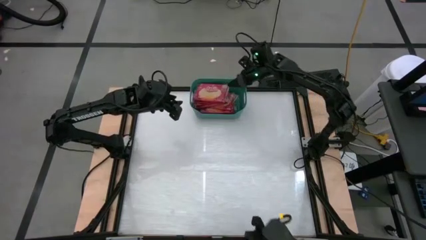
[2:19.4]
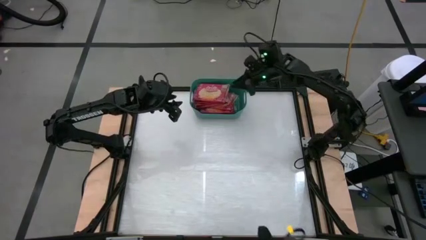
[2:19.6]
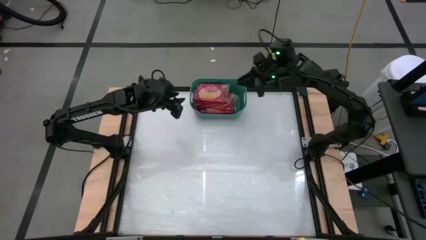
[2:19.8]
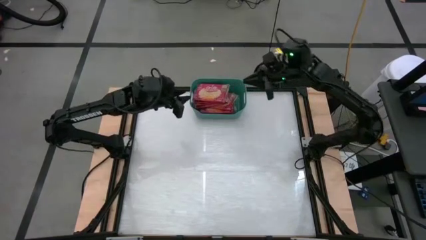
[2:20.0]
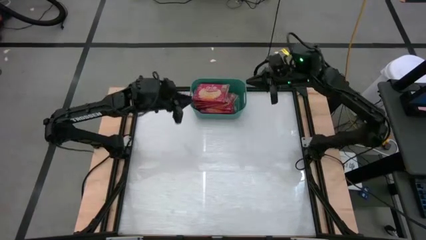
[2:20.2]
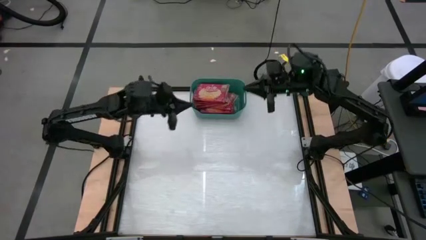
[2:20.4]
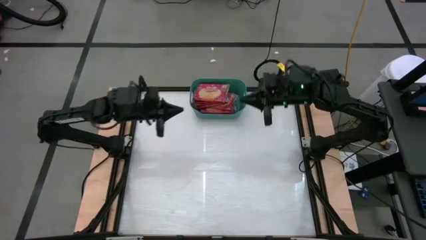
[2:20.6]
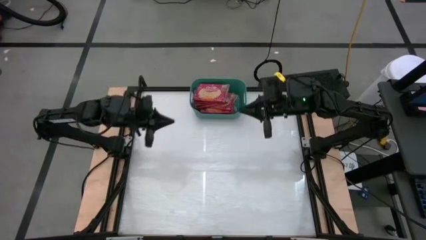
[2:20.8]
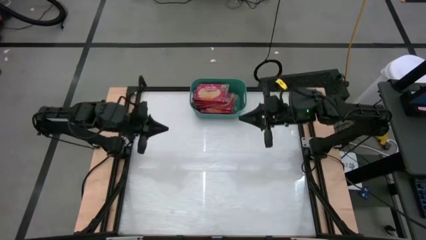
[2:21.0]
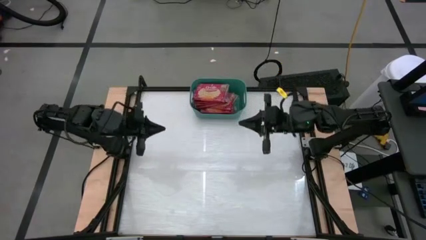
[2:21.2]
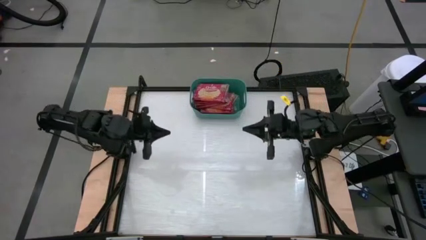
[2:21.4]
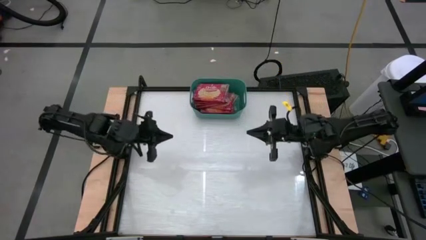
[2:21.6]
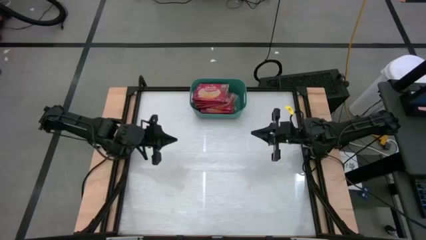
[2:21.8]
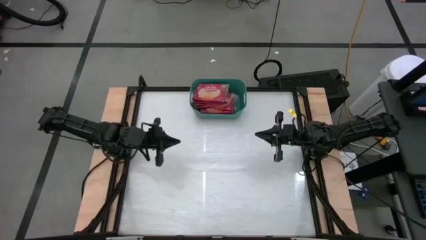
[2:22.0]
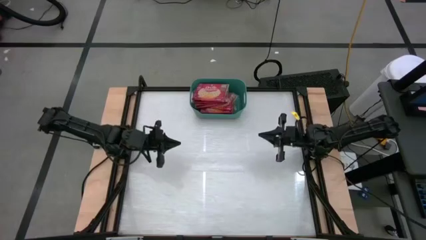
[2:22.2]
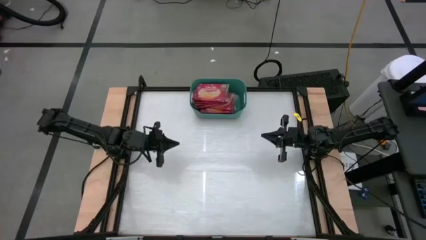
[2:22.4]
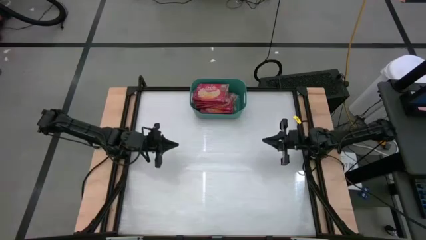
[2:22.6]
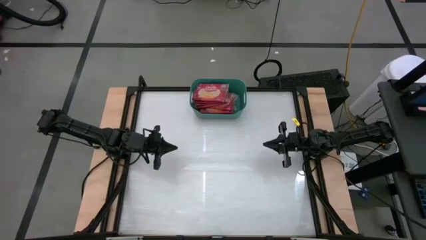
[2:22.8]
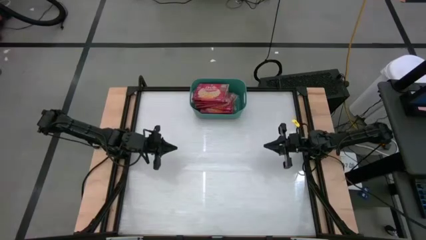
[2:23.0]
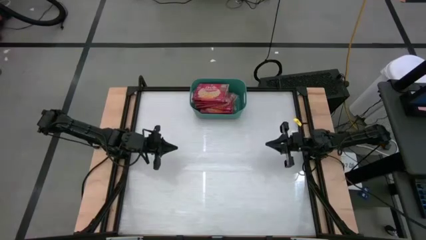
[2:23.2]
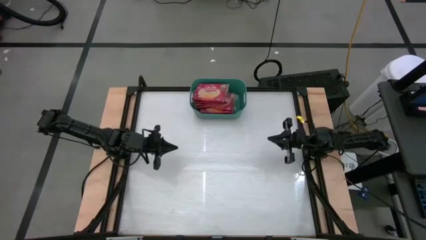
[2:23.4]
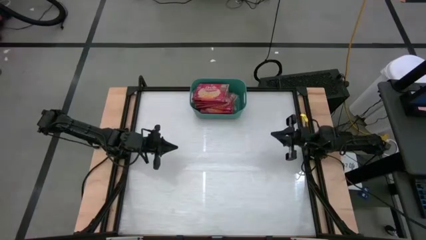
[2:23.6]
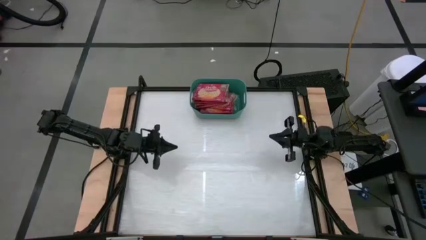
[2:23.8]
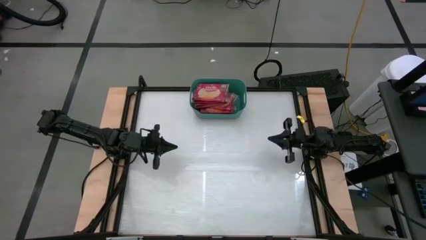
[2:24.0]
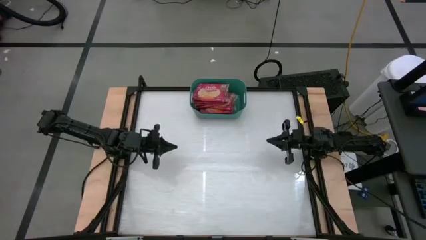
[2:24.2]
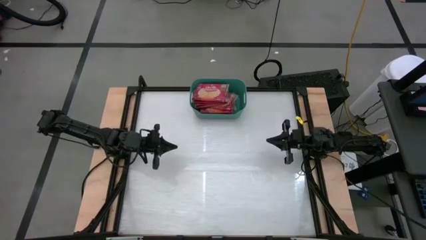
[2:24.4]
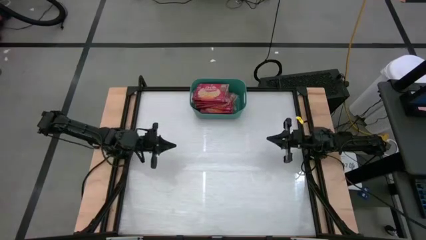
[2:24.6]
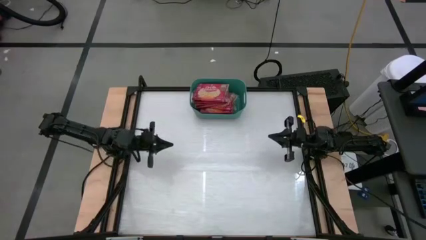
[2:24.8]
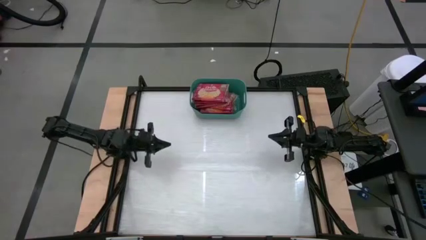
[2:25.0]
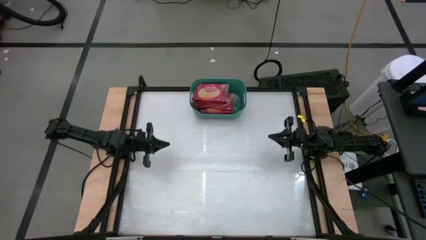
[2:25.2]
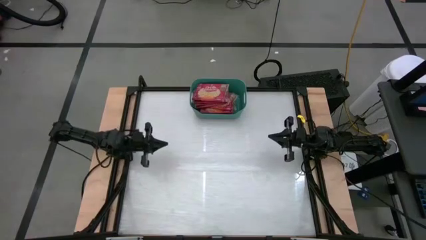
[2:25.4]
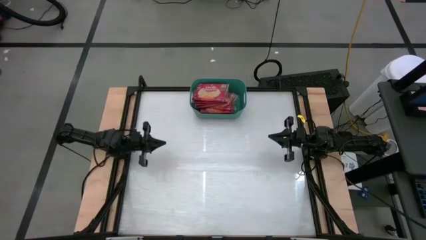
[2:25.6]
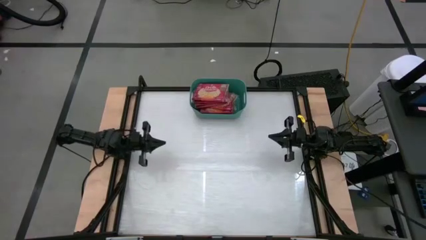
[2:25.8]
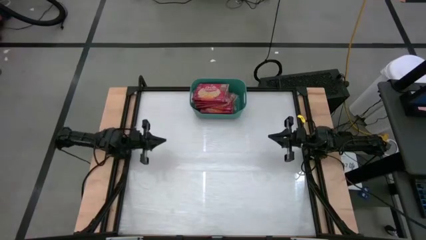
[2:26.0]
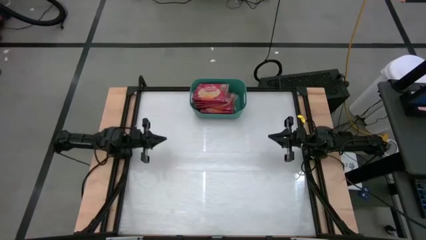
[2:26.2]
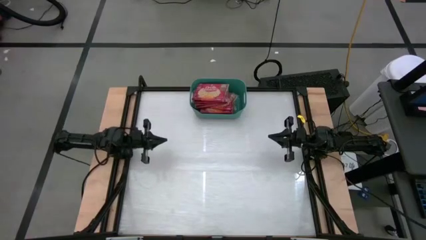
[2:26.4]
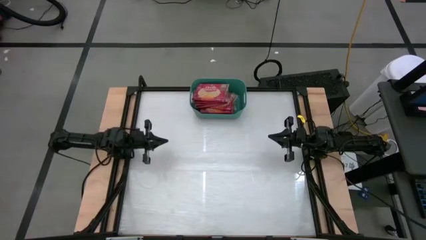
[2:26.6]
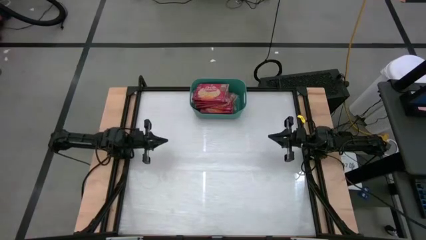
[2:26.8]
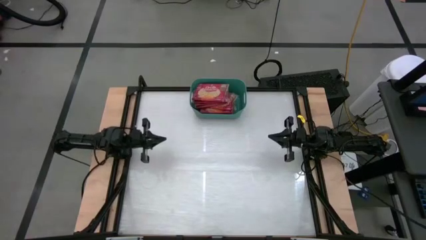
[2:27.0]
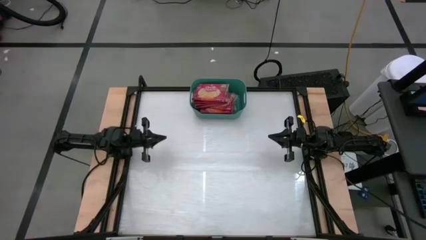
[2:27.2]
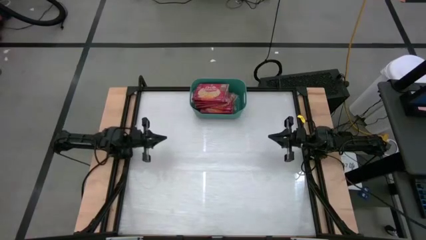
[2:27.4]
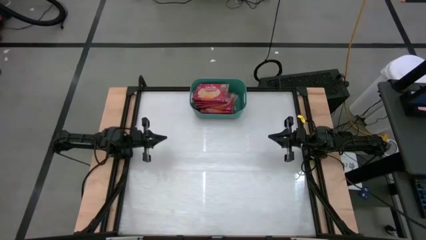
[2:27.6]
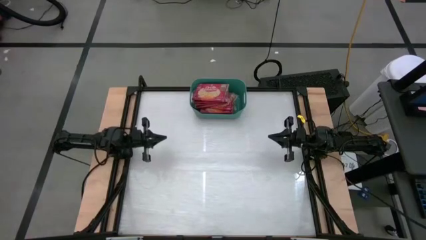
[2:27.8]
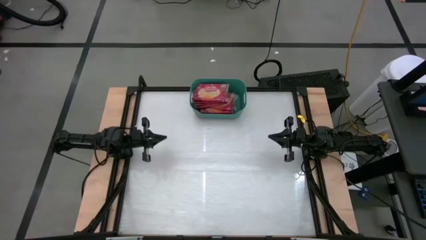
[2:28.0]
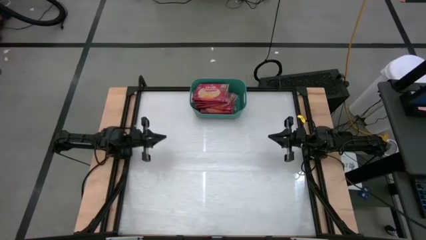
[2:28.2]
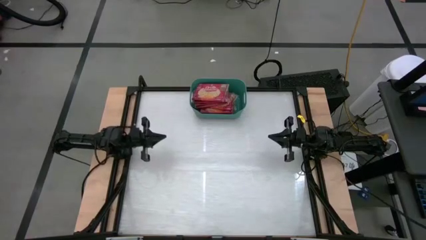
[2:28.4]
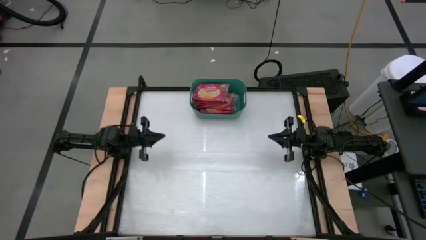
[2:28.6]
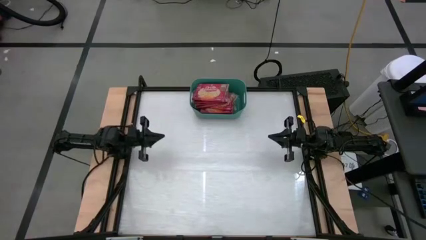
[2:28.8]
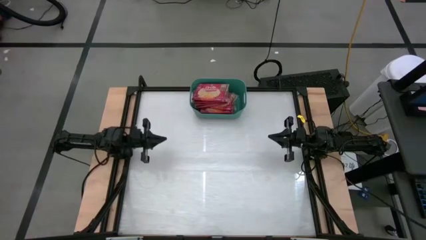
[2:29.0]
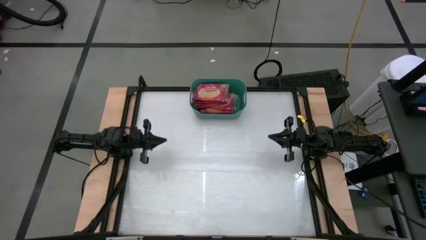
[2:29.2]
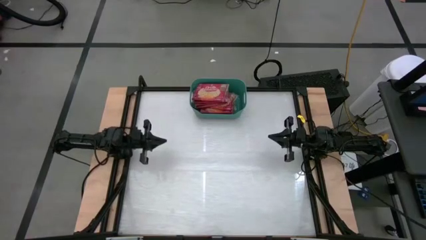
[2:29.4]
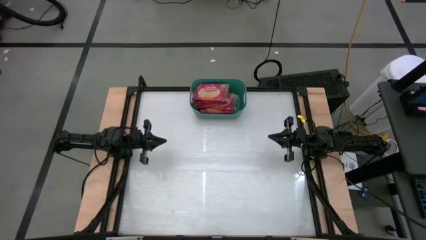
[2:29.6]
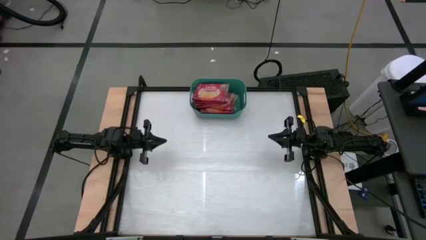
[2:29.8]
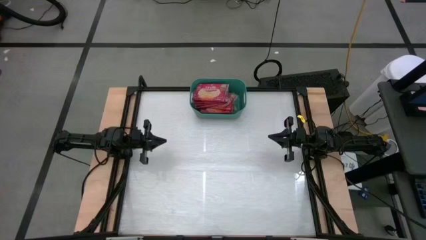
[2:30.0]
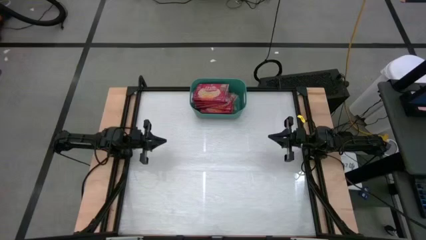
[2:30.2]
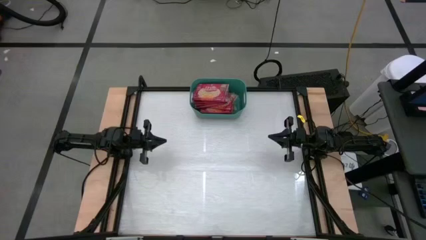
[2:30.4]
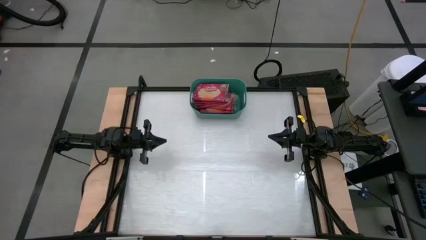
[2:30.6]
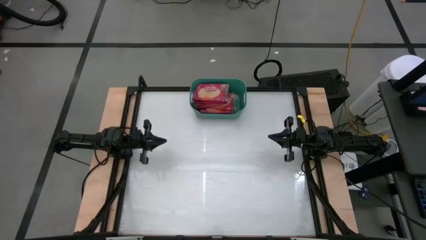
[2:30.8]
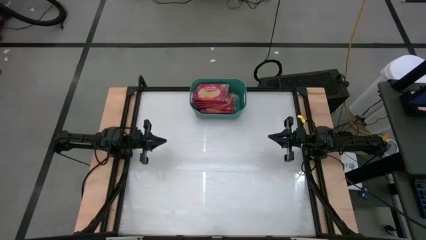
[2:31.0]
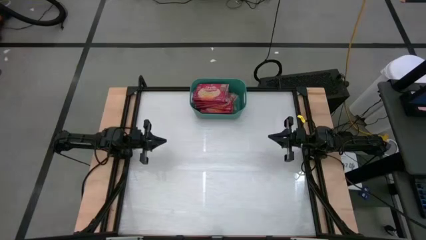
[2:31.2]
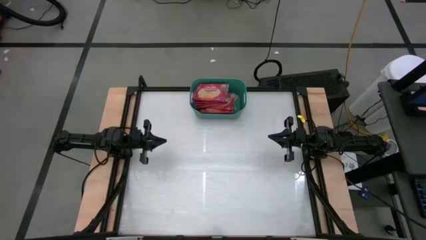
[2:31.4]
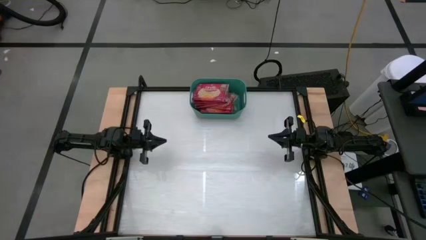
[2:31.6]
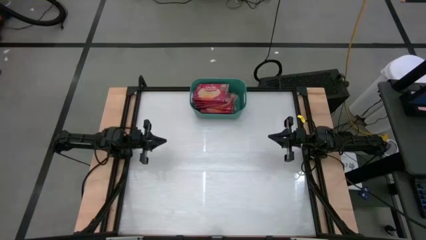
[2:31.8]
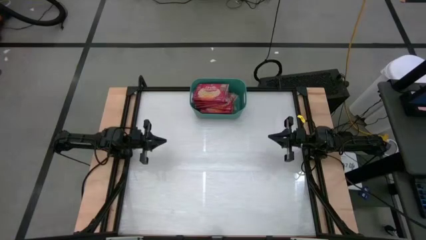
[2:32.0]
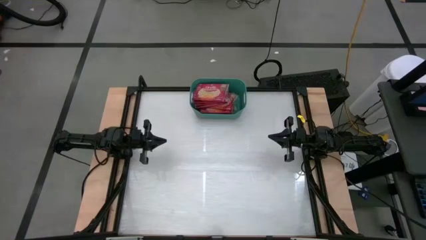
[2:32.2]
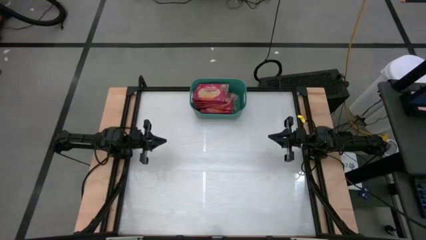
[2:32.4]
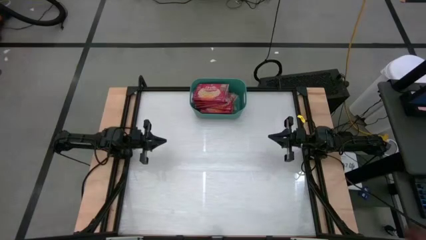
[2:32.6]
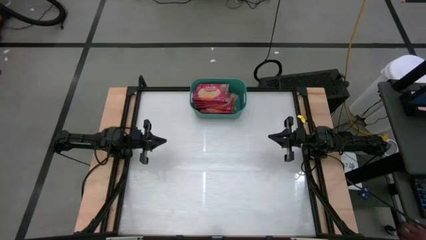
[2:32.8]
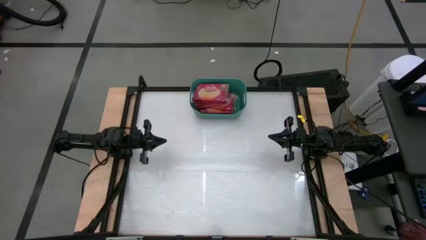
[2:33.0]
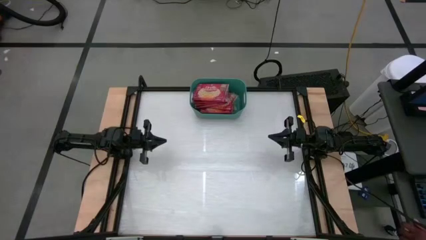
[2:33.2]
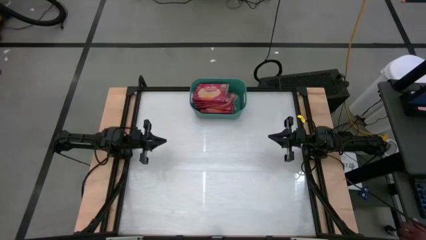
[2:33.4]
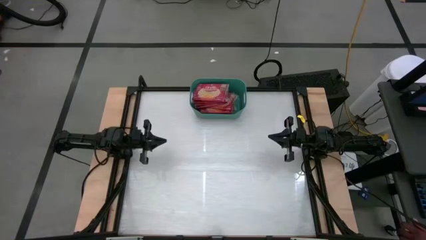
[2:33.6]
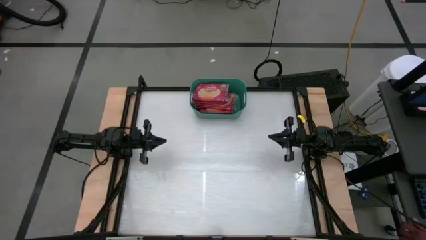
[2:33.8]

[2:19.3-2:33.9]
Task: Sort popcorn bags into baskets
Return to Home Position

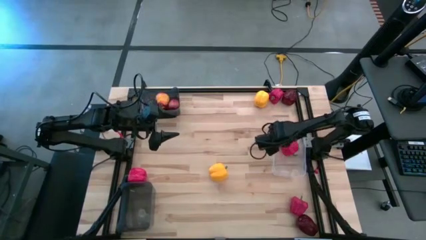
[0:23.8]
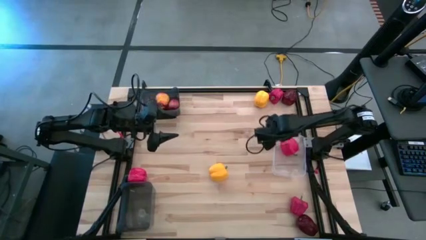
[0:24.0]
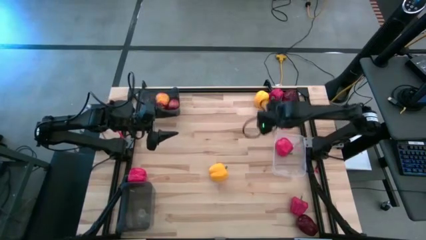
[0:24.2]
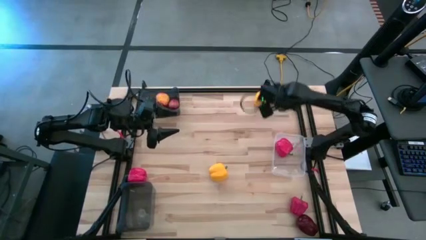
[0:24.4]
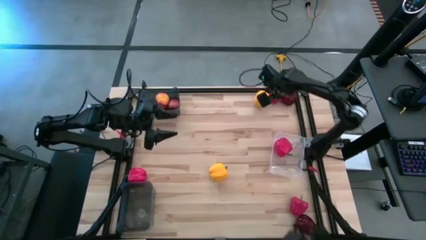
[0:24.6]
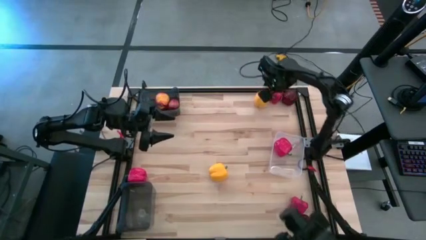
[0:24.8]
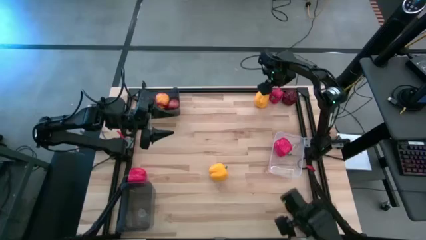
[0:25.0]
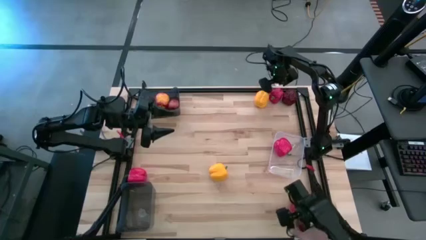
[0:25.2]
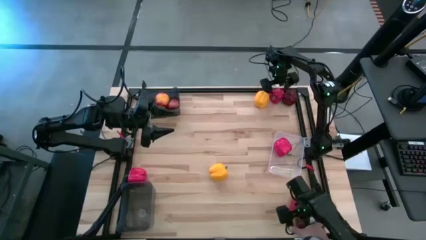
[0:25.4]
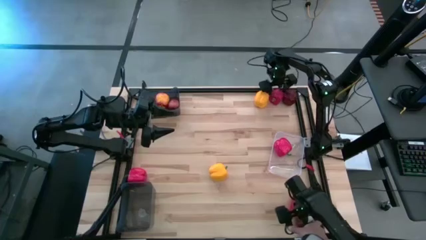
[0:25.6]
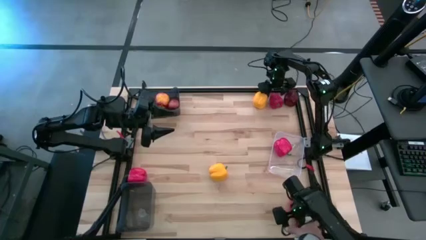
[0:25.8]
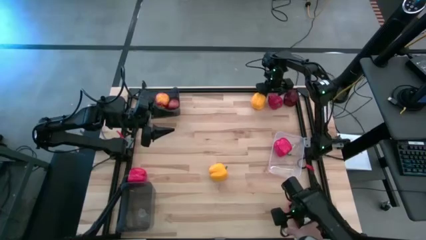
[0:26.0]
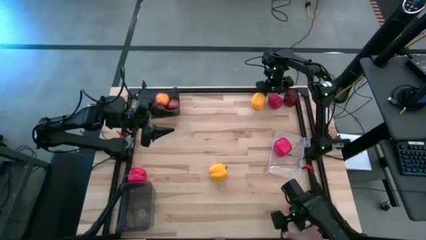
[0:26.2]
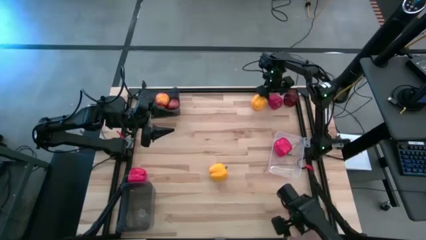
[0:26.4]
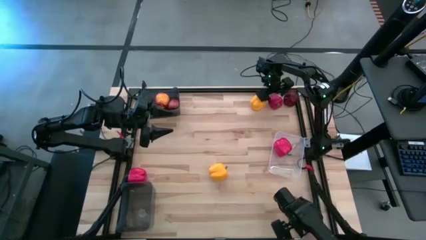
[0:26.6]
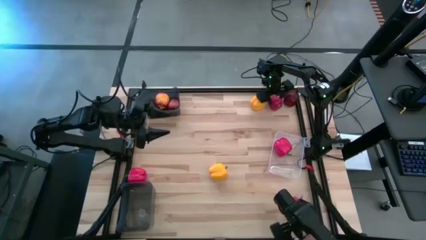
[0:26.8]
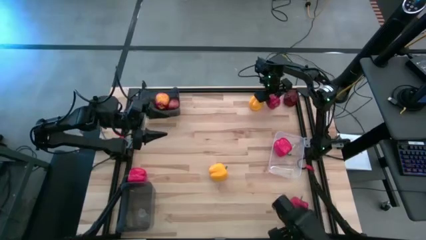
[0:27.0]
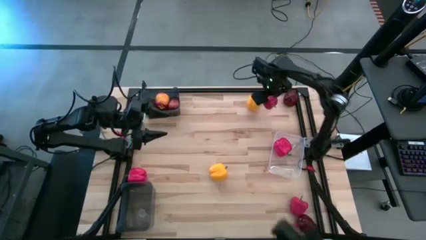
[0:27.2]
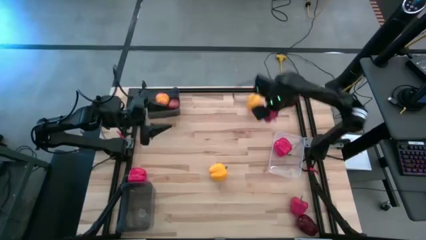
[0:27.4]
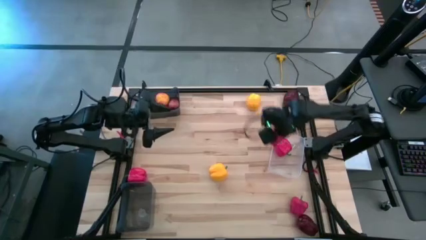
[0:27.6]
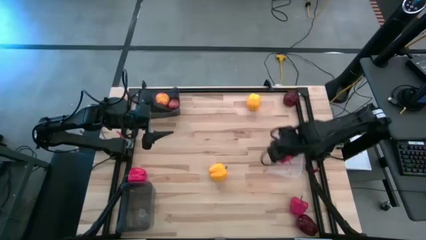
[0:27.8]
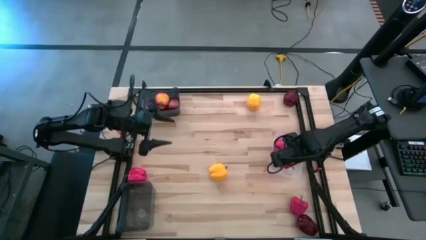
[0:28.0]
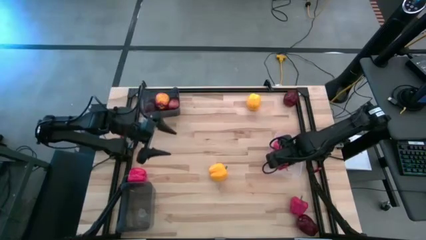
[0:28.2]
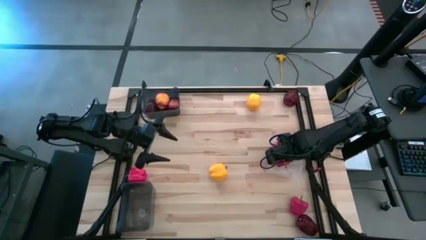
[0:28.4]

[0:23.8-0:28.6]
Task: Sort produce into baskets
Put the red bell pepper into the transparent bin
